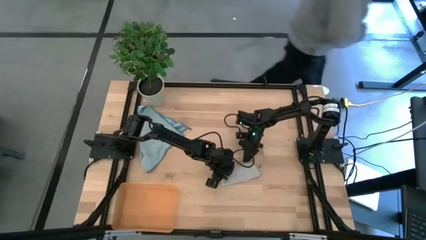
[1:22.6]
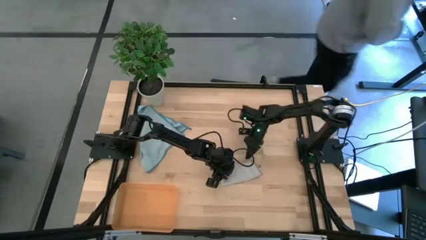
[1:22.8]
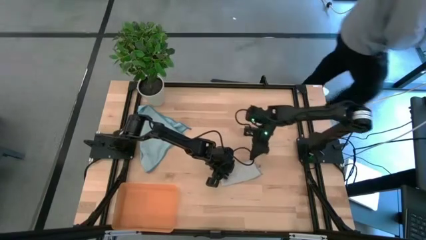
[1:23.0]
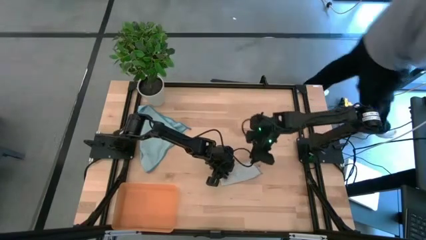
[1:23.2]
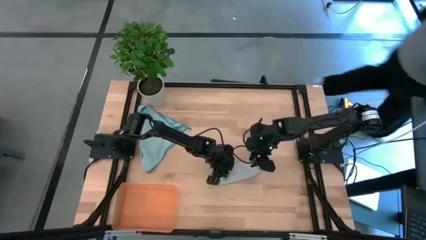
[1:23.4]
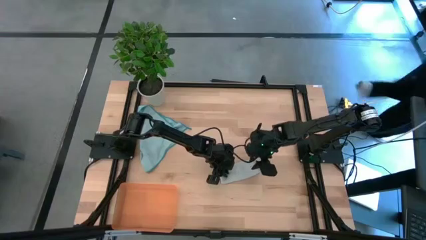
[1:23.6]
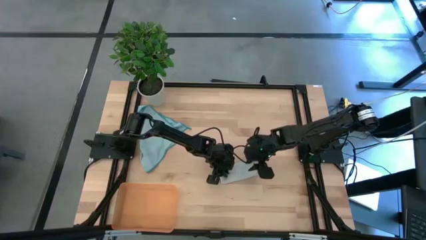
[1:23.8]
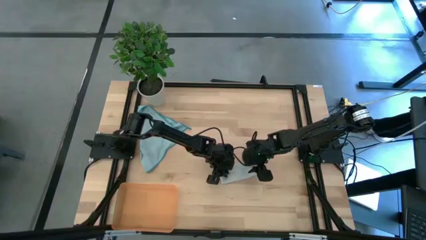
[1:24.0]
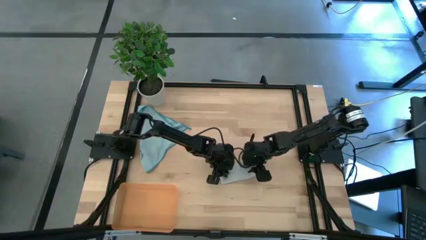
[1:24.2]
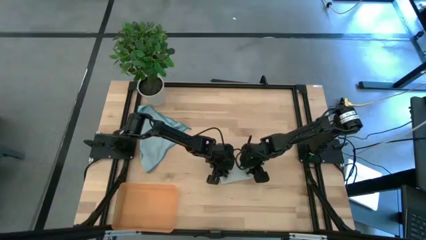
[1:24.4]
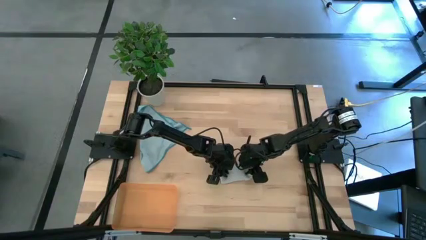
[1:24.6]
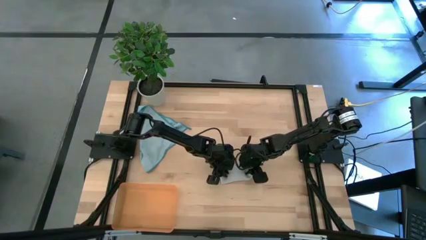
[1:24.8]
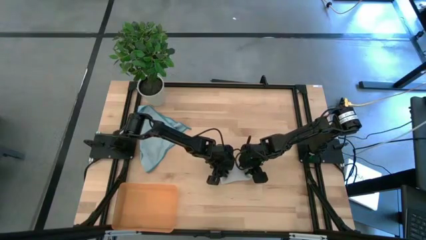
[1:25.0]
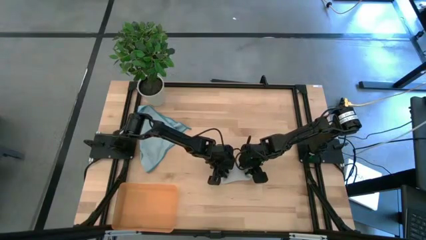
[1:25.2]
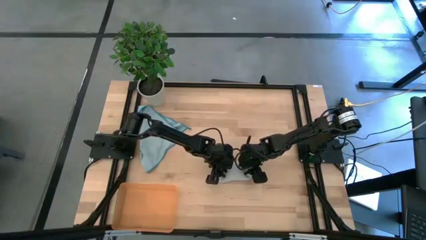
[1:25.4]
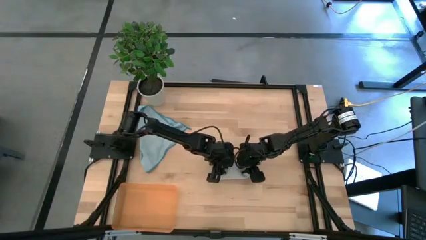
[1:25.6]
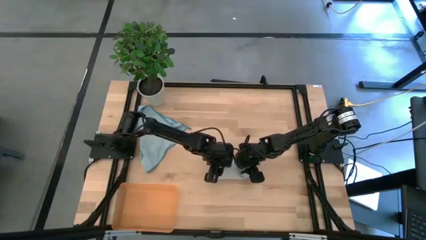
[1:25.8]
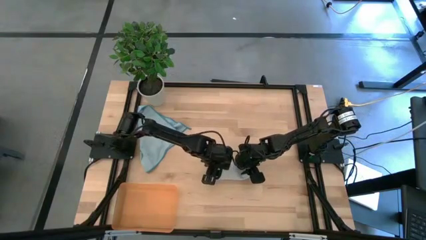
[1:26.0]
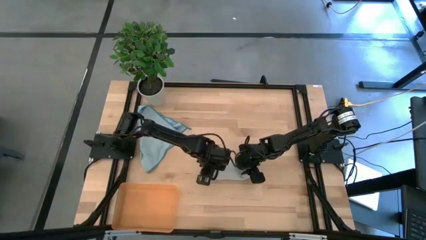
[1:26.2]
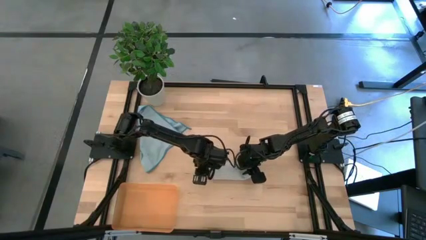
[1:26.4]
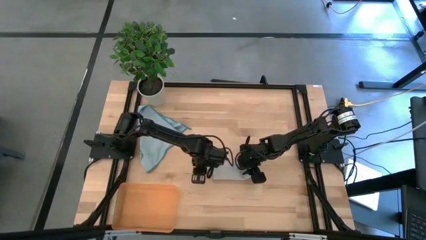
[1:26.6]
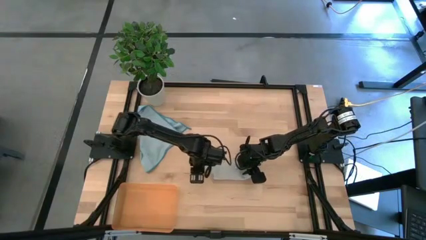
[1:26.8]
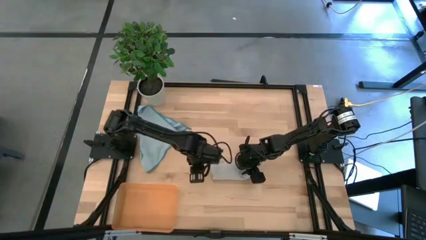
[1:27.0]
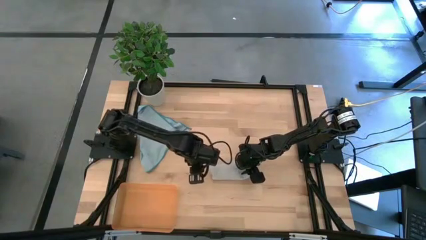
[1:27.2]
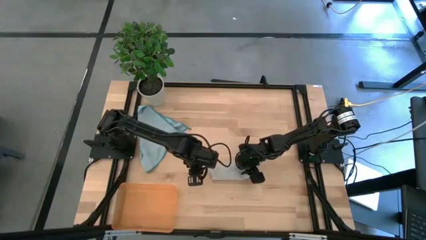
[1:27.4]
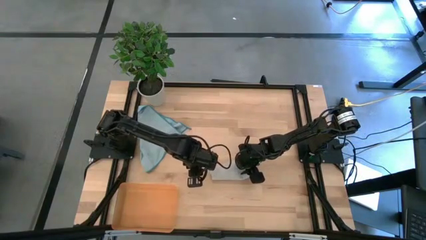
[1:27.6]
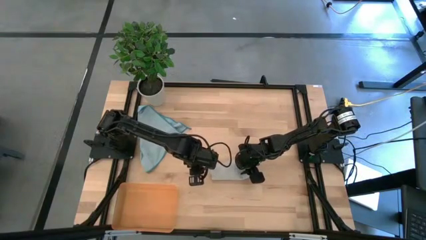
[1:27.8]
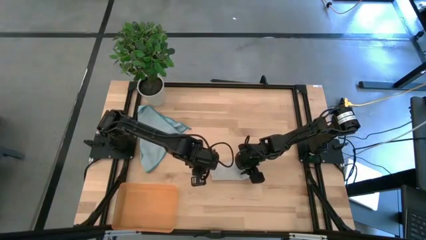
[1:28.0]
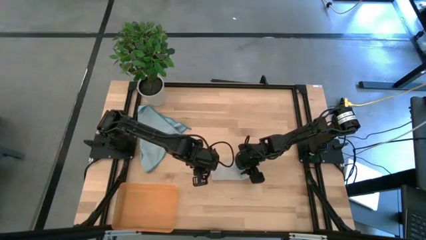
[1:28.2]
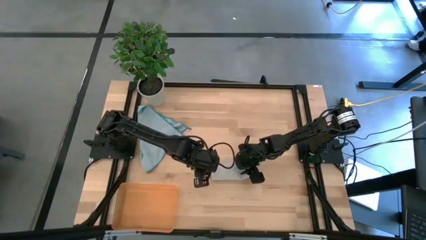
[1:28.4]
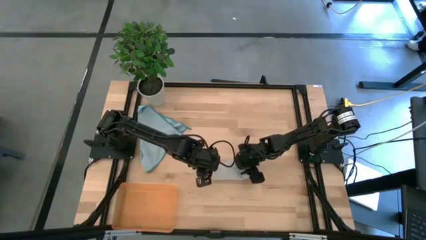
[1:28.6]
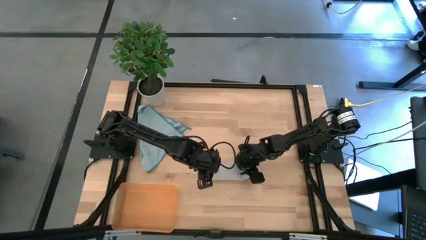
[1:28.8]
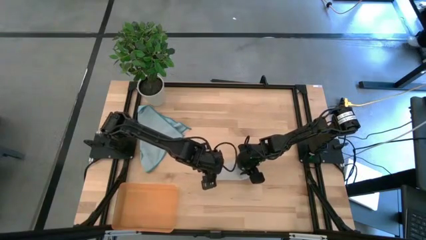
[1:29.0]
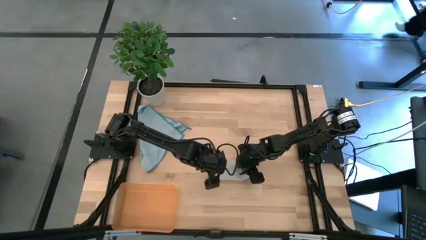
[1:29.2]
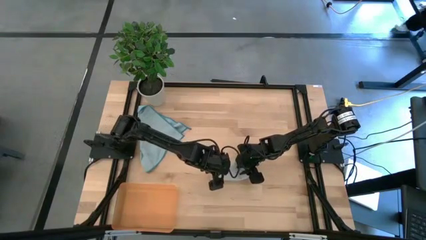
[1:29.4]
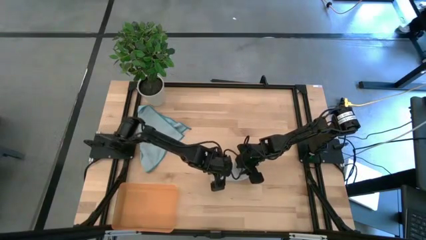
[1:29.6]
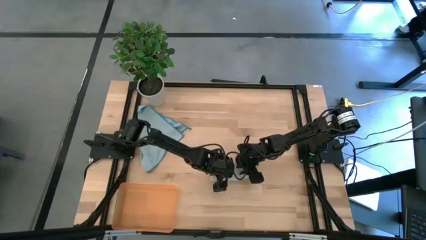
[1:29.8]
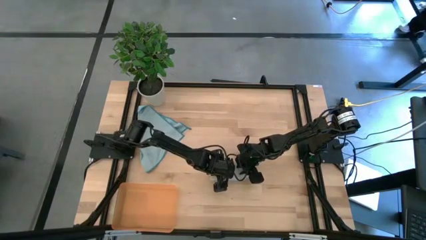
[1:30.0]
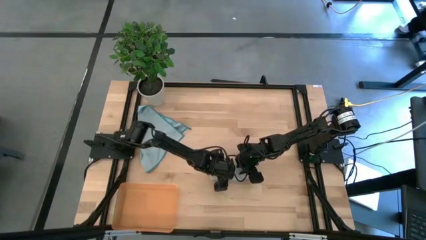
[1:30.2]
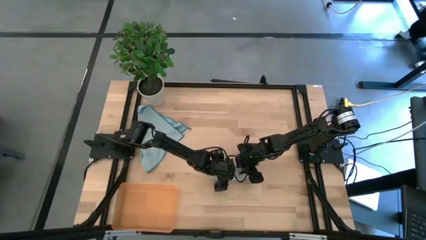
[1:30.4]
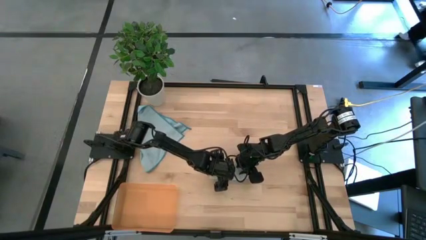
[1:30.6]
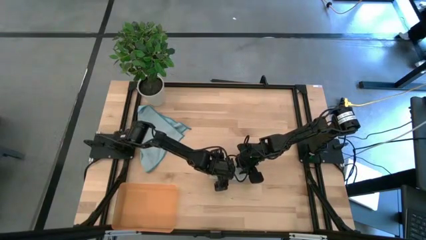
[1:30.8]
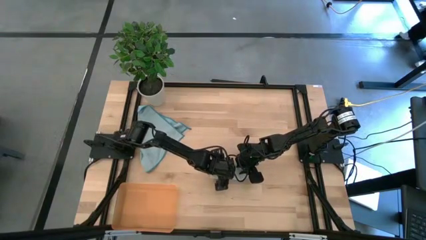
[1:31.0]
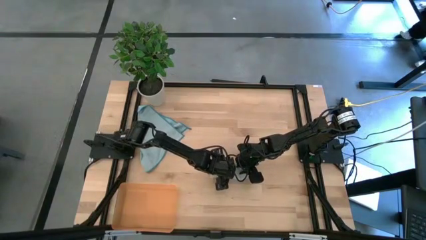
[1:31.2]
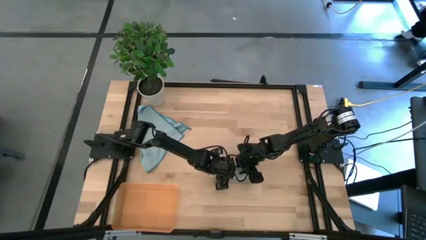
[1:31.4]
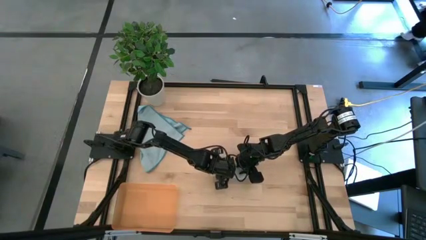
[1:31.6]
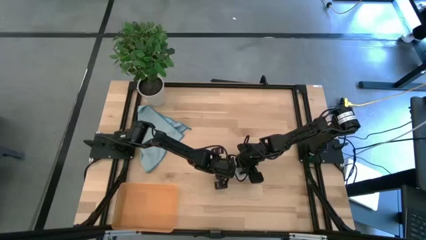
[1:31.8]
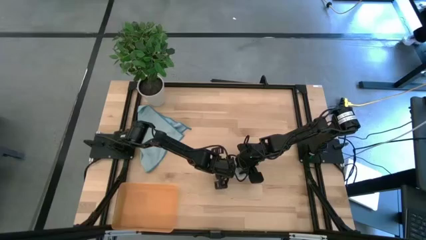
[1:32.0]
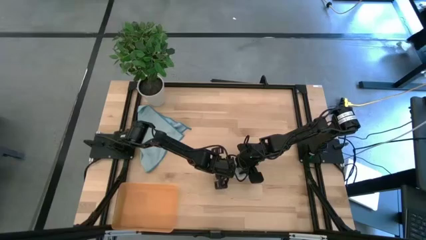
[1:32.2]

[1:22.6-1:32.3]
Task: Roll microfiber towels into tight, uniform cylinder then place into a basket
Put the rolled gray microfiber towel into the orange bin

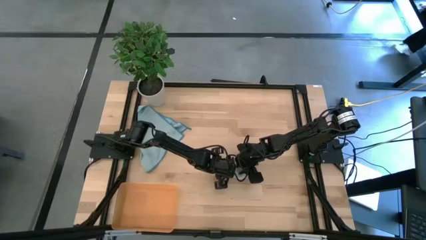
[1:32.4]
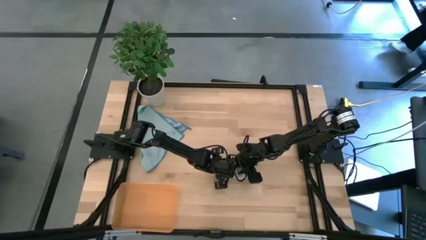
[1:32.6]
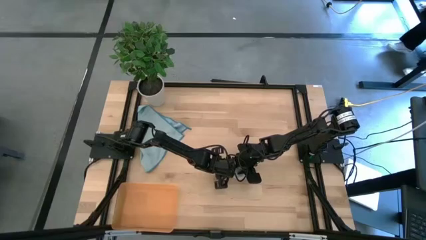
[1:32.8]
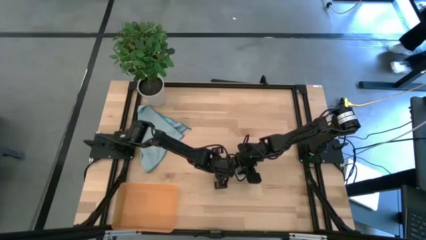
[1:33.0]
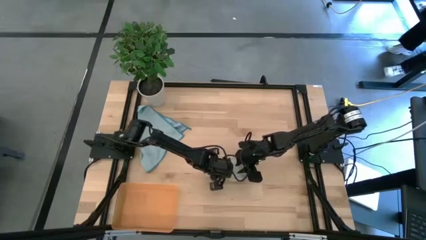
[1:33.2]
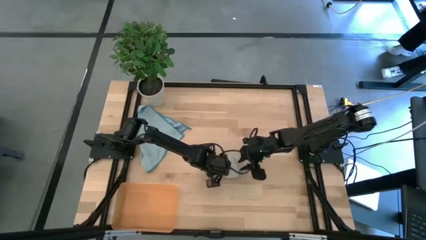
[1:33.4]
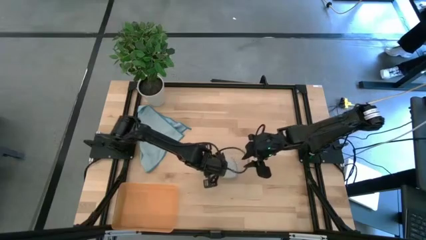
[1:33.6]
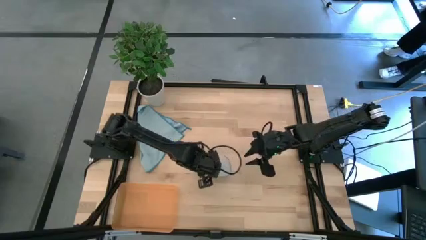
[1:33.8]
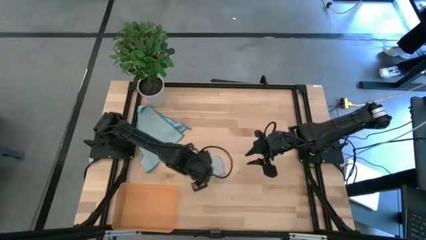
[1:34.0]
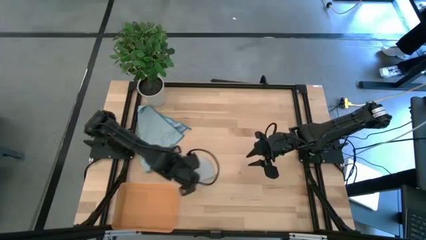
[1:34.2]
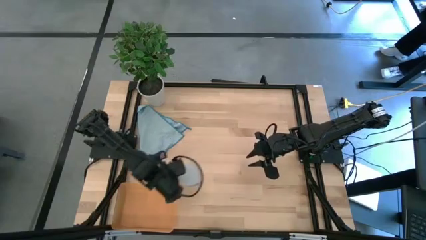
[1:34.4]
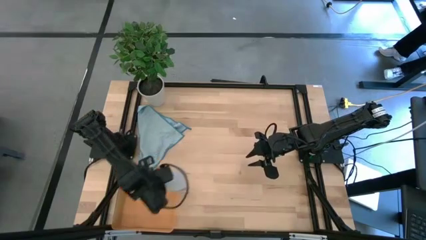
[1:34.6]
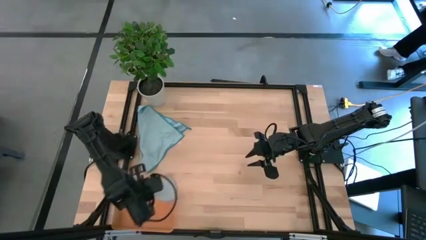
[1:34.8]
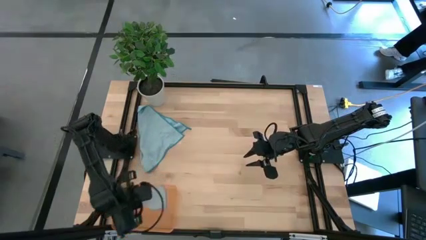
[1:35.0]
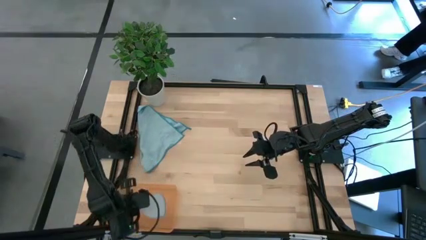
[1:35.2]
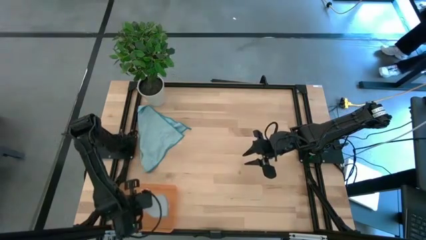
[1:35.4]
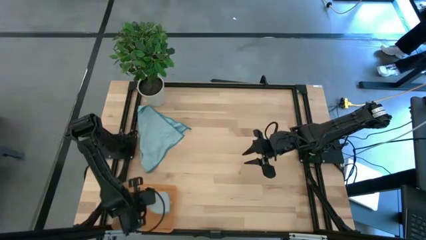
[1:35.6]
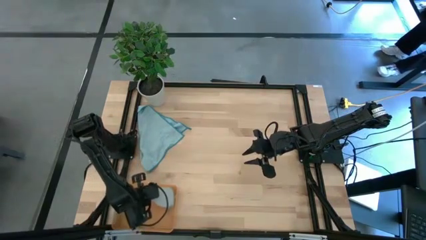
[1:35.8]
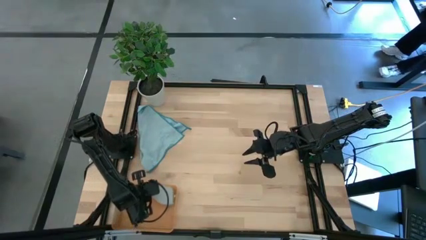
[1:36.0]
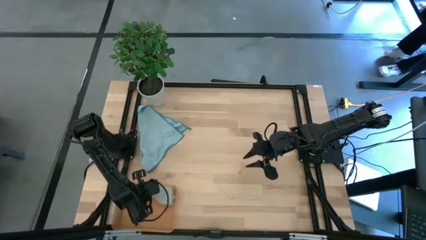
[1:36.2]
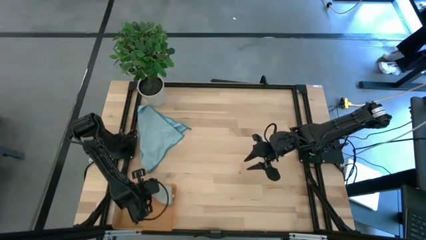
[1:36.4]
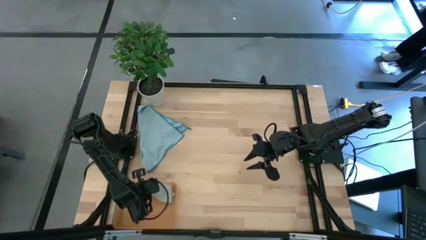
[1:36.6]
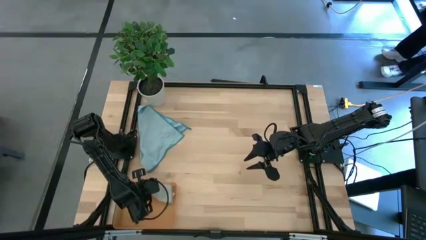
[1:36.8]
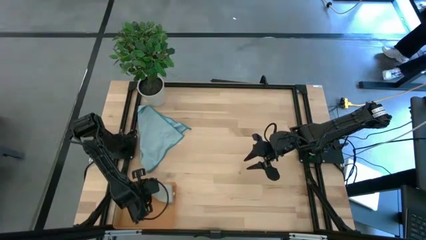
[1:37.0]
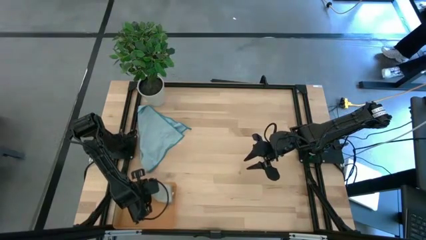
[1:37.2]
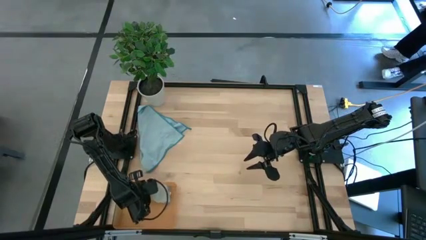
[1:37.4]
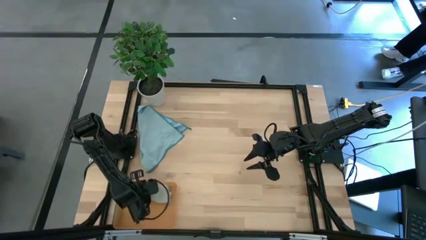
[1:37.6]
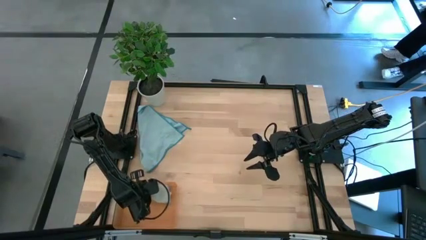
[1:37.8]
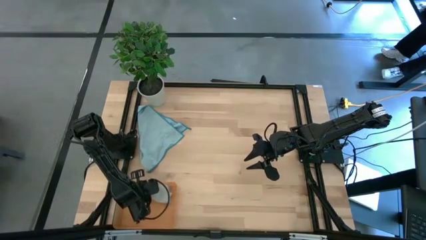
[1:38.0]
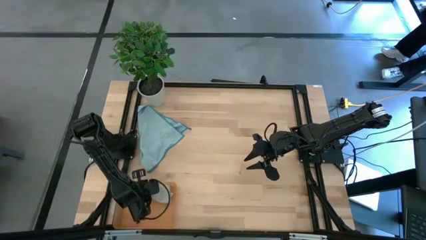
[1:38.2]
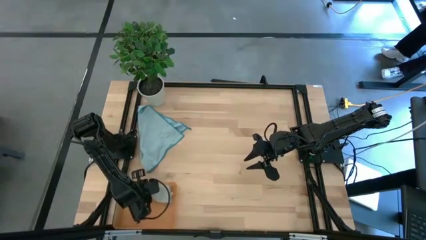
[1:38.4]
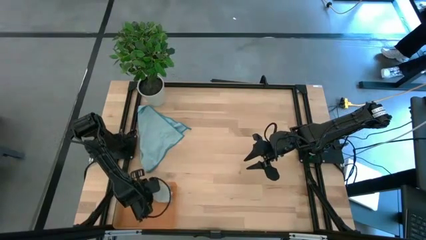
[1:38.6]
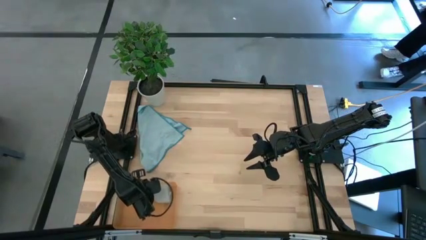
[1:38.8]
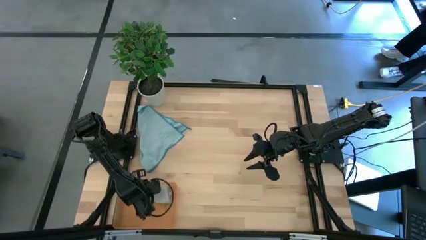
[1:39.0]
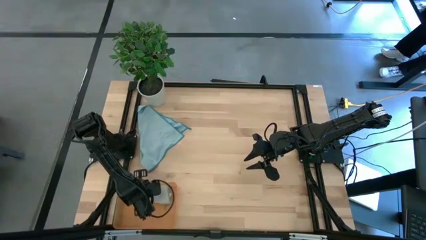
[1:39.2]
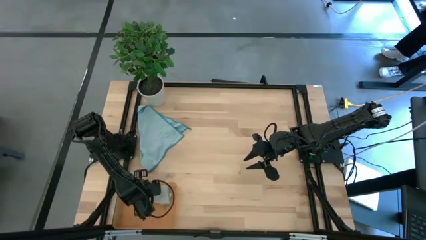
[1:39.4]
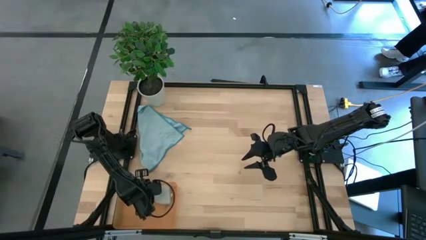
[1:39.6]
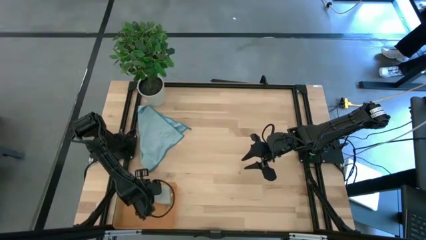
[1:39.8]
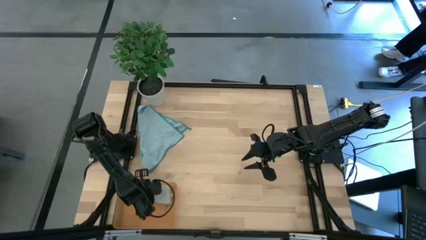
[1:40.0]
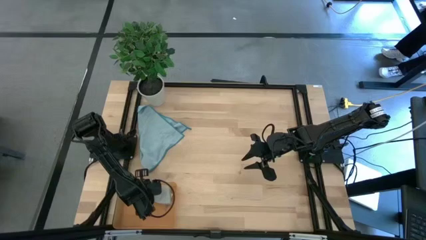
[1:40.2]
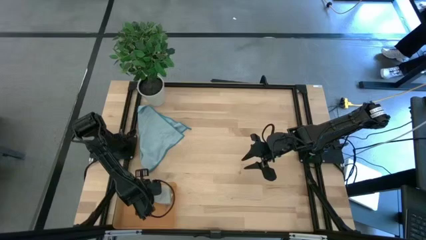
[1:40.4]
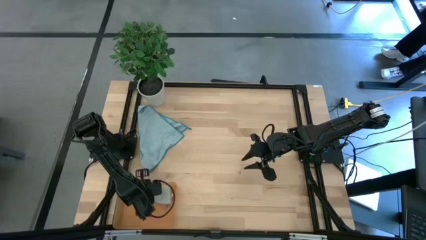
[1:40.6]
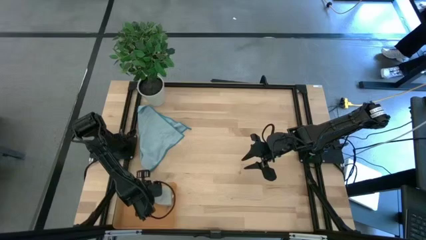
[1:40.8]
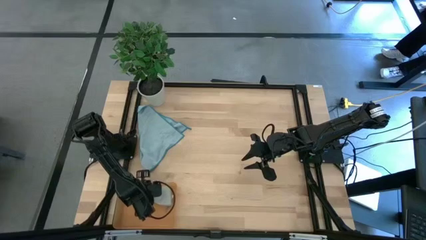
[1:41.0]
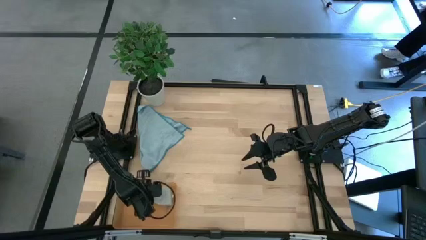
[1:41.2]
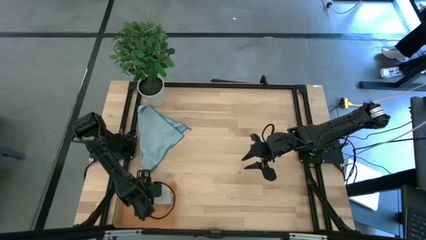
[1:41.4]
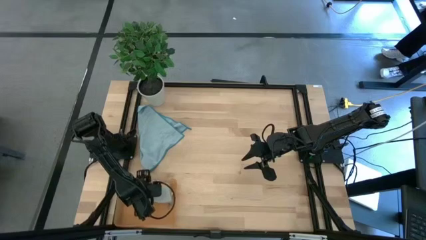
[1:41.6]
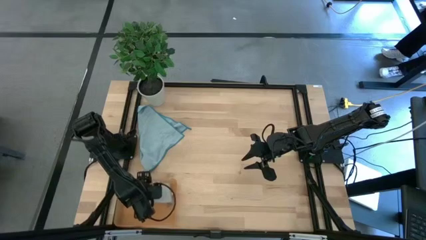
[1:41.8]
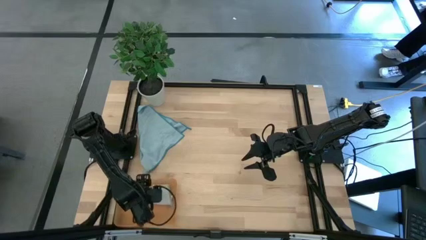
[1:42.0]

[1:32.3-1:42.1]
Put the rolled gray microfiber towel into the orange bin
